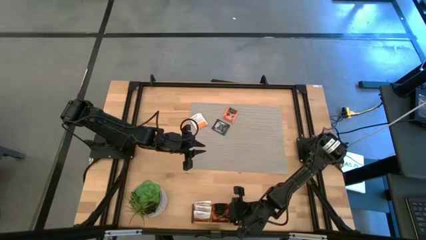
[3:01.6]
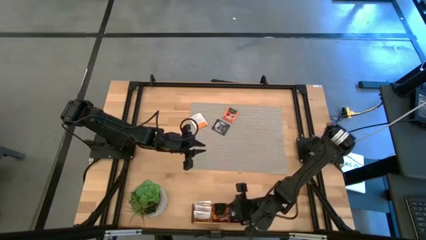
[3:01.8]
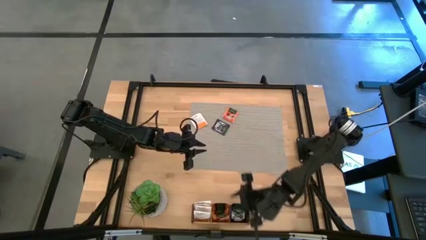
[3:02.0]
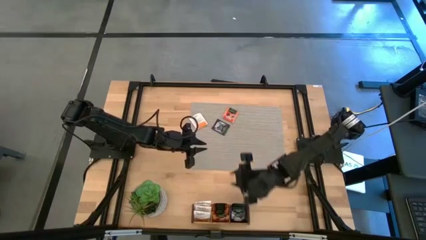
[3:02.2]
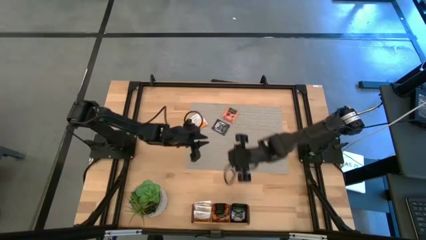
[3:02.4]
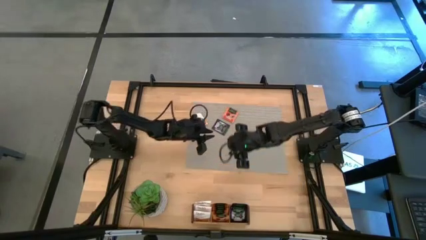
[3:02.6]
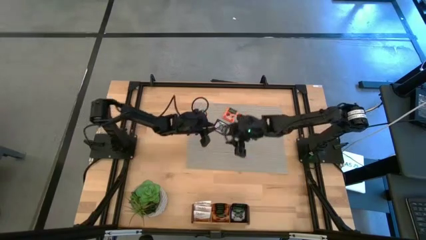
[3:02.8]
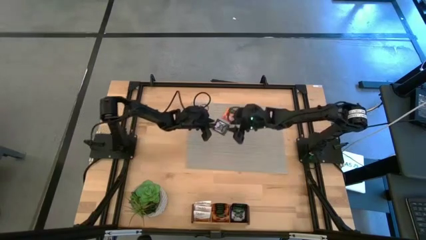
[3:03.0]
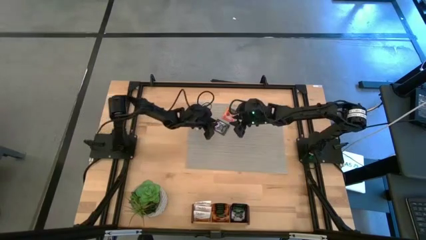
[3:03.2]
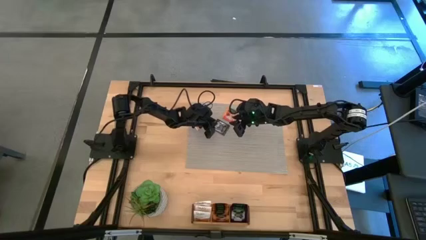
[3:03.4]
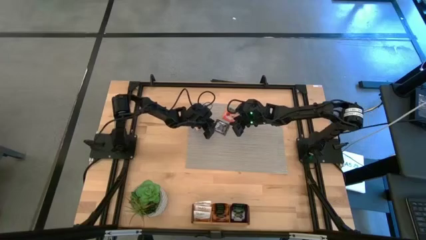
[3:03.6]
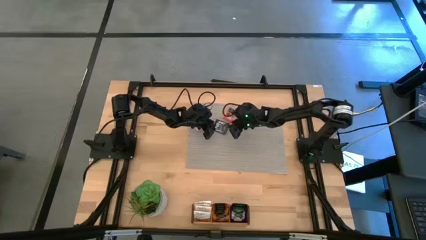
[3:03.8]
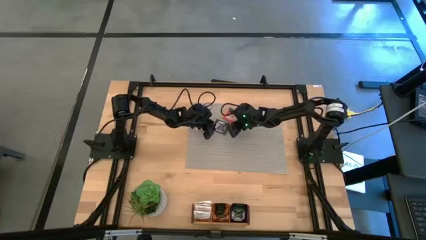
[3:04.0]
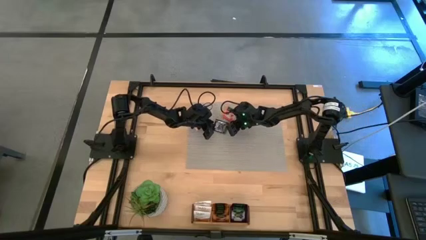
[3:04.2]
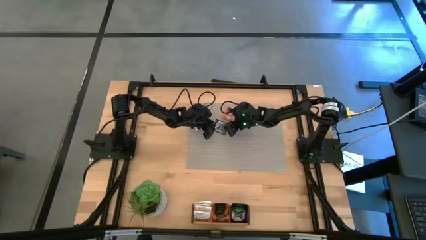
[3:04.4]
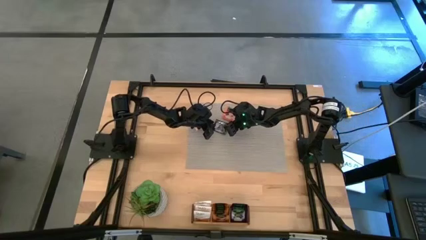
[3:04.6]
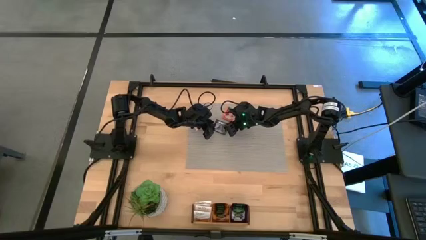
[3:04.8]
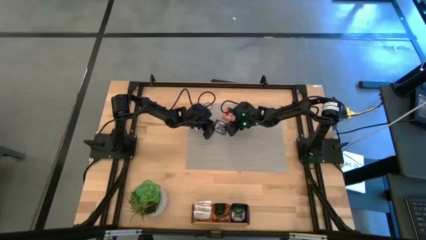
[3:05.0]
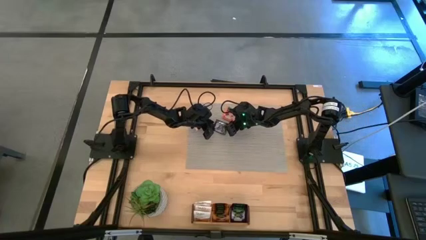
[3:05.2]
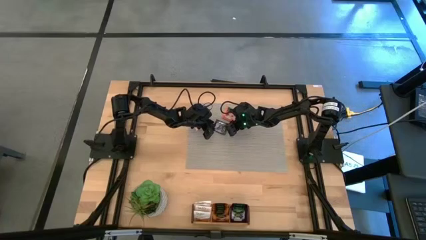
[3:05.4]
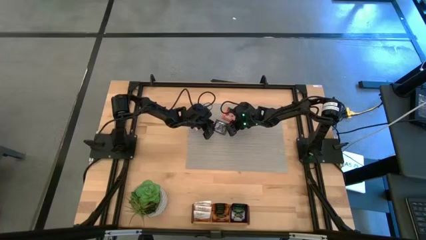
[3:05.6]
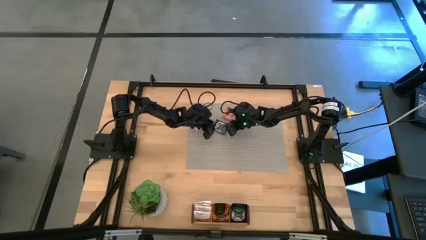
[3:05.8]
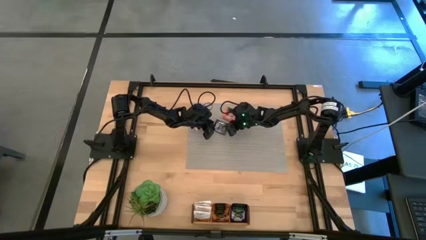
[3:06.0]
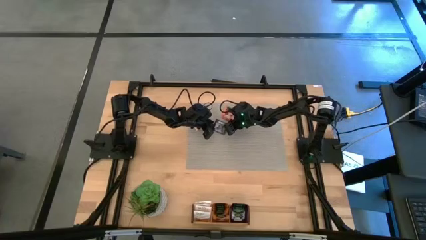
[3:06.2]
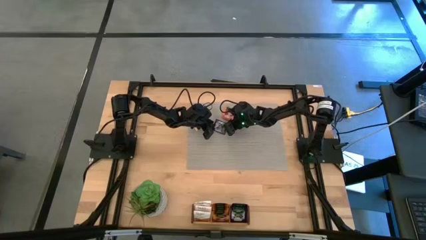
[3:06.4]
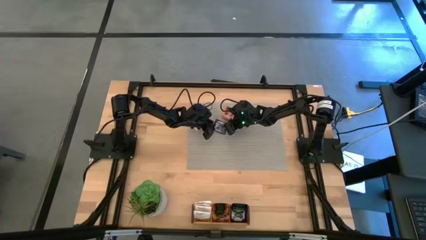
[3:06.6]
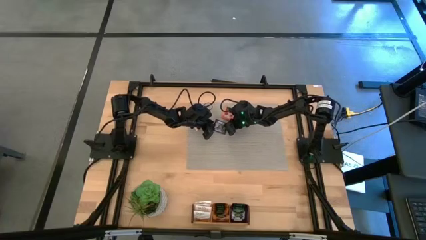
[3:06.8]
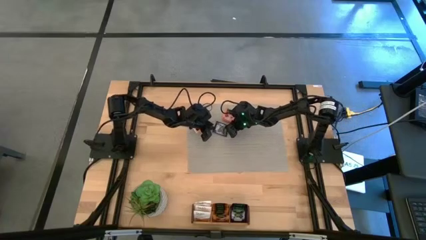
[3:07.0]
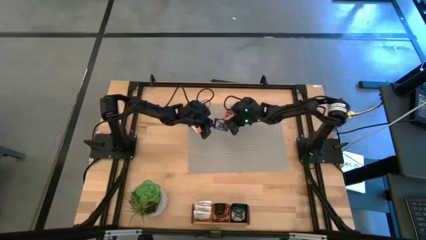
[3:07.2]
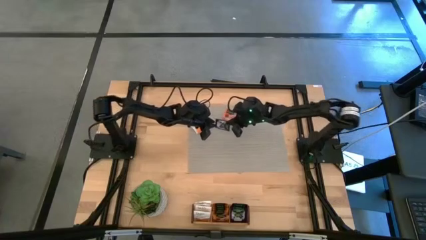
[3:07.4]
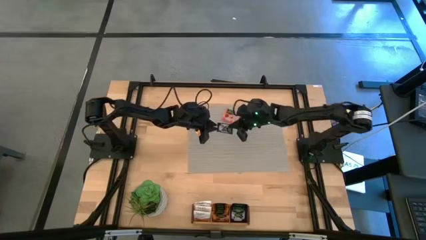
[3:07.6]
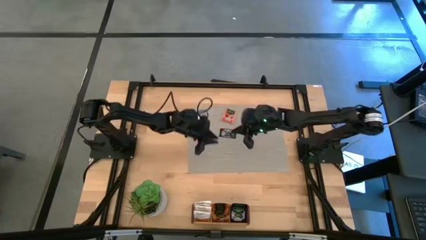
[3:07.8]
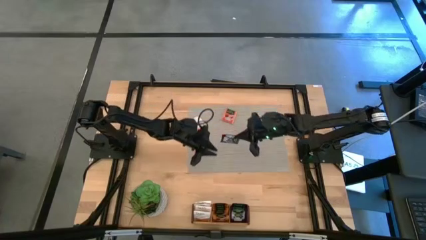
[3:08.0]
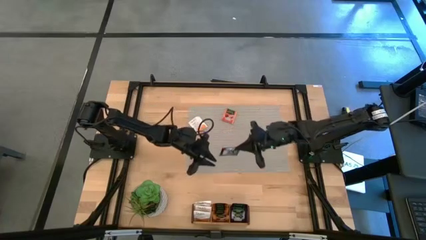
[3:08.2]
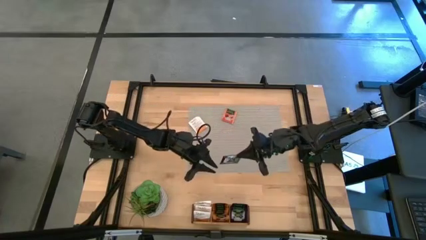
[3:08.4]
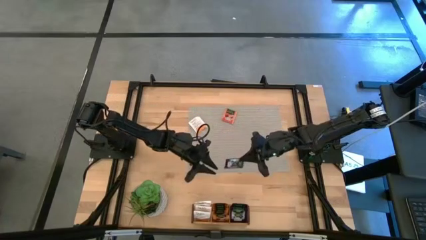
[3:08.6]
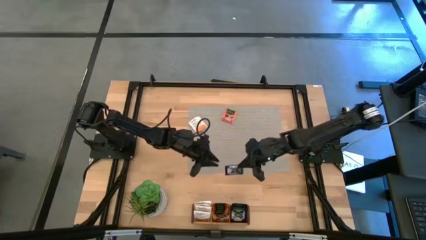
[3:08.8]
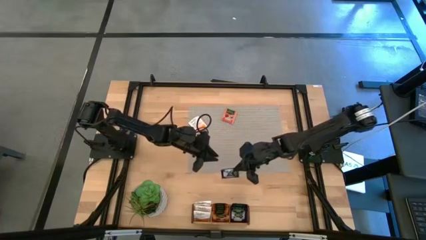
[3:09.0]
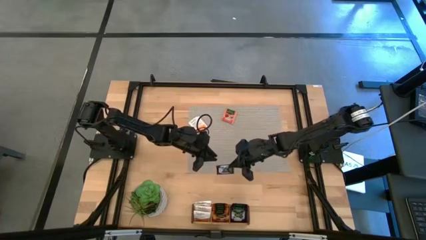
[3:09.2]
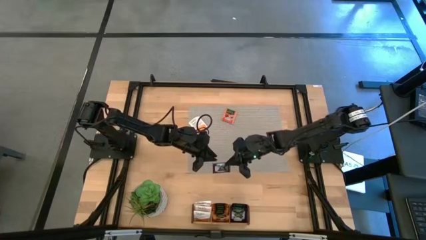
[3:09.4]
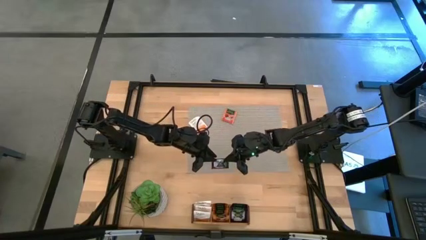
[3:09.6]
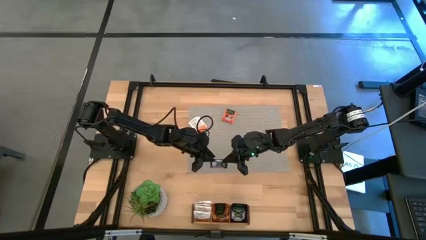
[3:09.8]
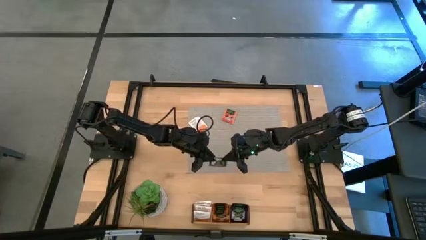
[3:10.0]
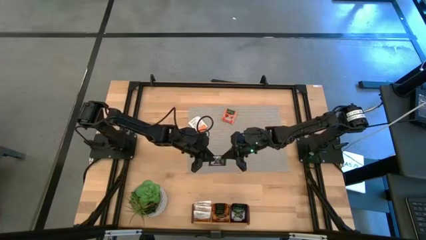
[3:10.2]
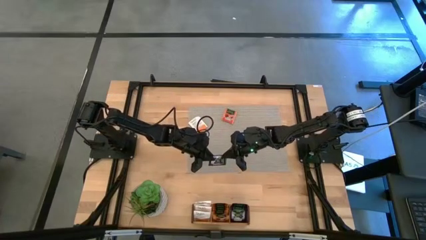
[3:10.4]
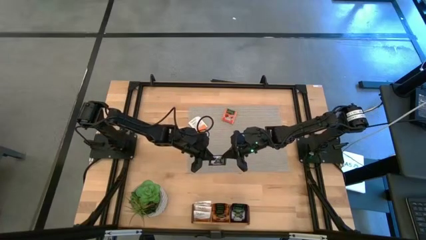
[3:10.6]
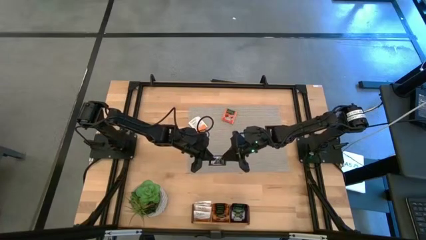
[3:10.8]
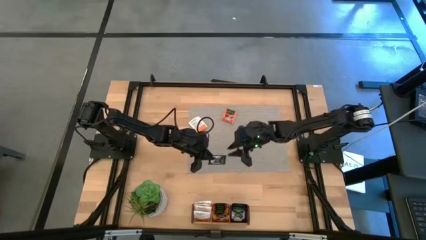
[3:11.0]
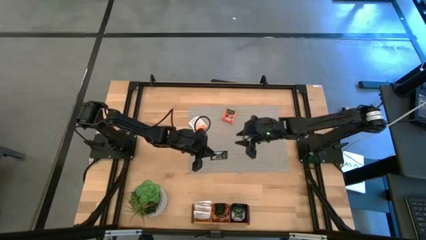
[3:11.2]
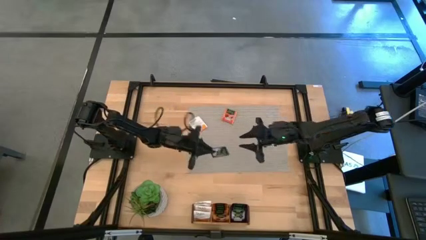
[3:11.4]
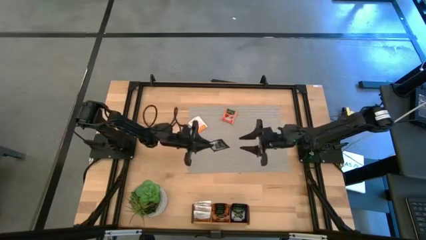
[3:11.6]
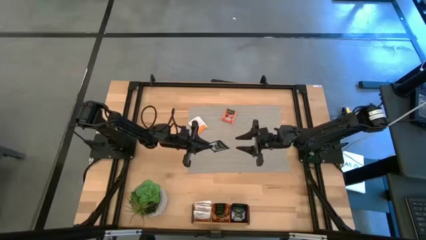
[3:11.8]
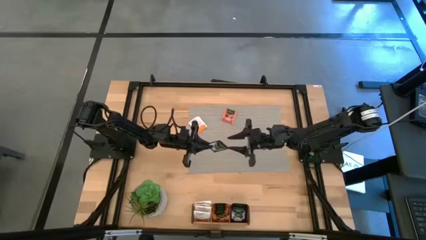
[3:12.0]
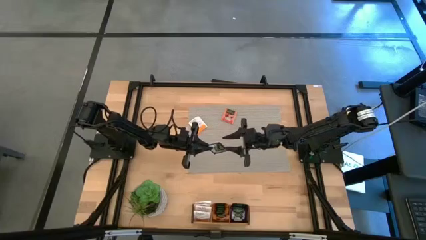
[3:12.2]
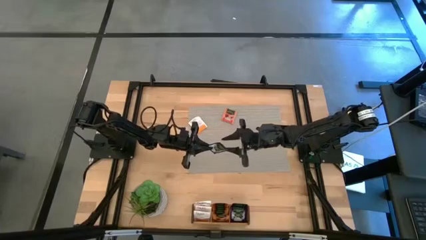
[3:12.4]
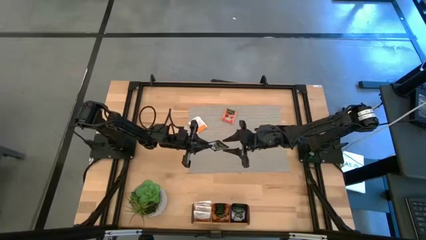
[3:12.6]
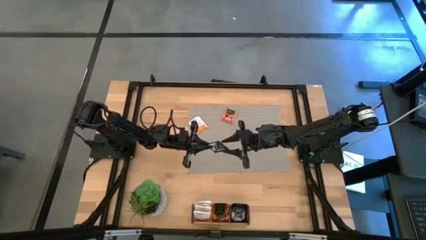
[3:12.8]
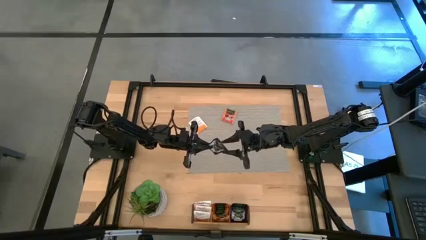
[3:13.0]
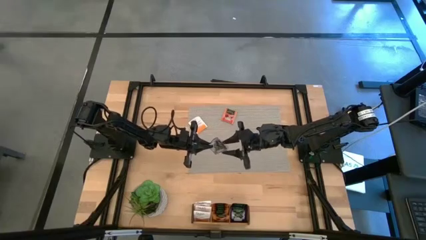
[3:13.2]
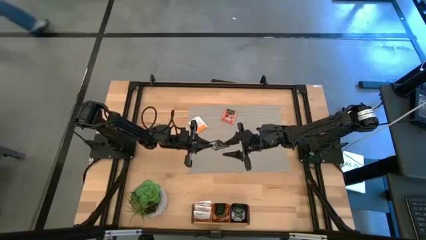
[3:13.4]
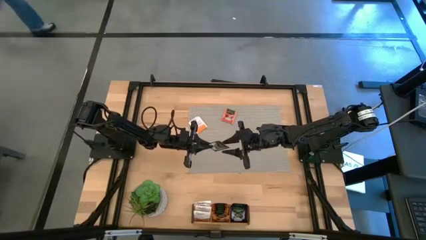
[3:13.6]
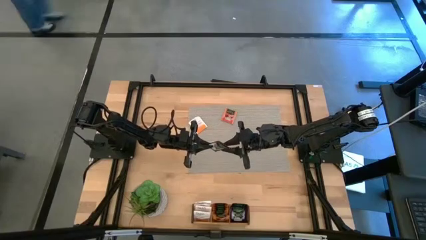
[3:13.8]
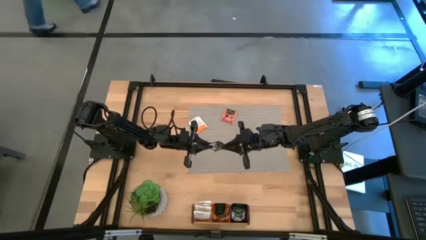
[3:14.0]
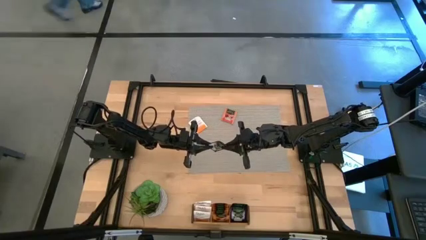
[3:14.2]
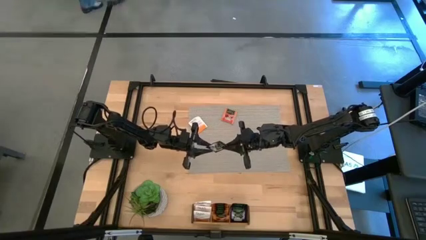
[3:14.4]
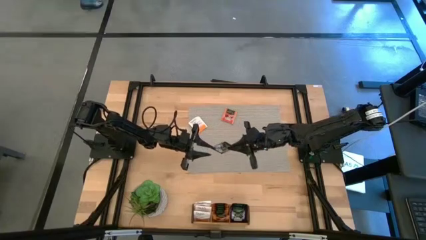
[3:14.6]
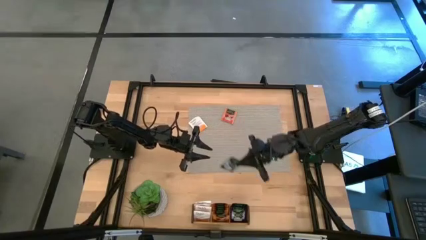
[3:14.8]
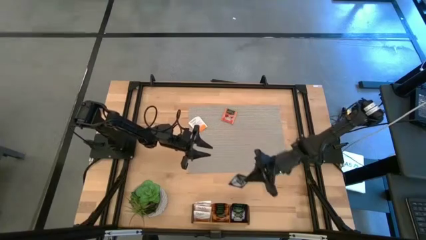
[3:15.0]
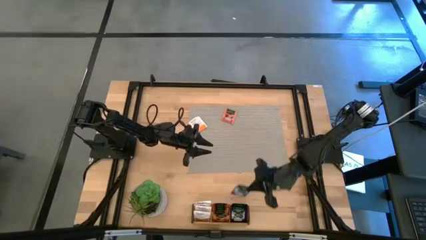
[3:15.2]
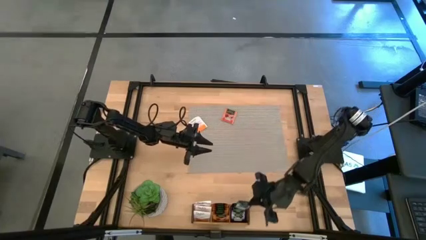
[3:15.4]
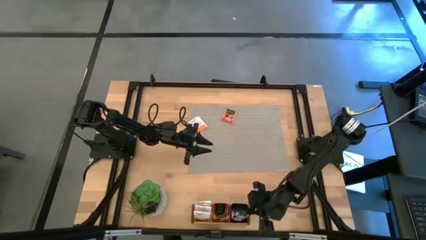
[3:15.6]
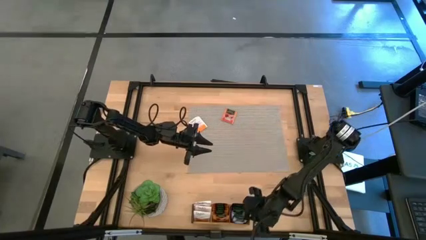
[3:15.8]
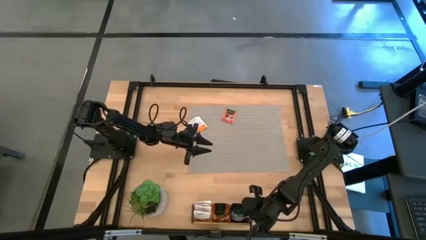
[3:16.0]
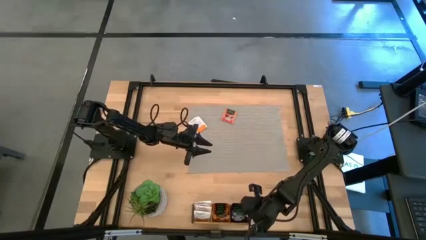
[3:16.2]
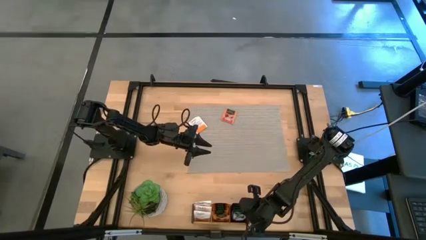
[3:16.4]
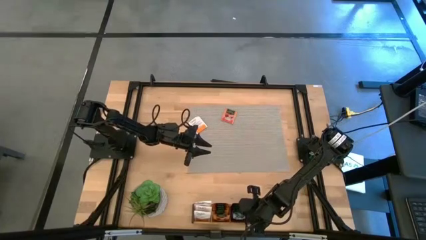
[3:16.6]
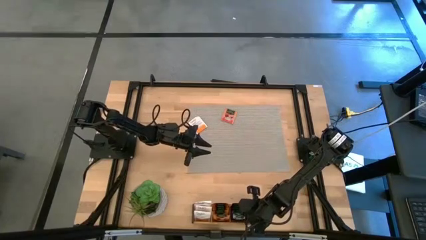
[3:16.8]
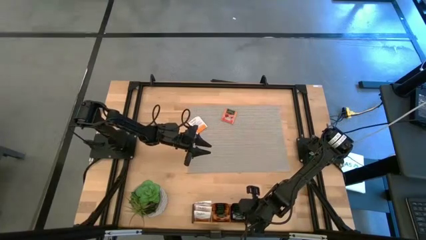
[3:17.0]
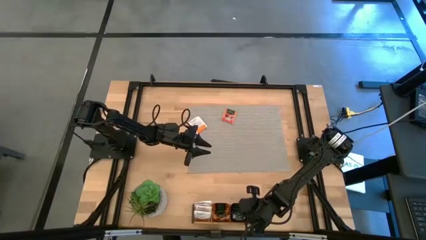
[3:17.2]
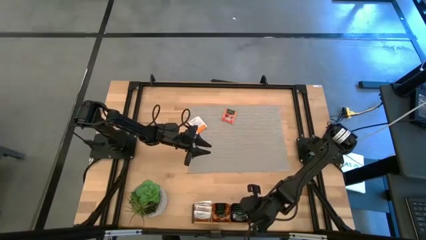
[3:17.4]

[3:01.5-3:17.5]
Task: Pick & Place Tea
Put the black tea bag into the right section of the wooden organizer
